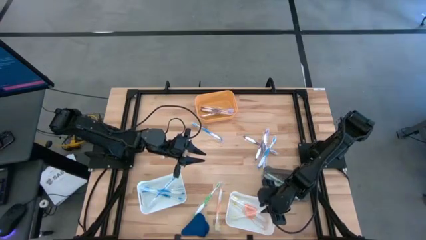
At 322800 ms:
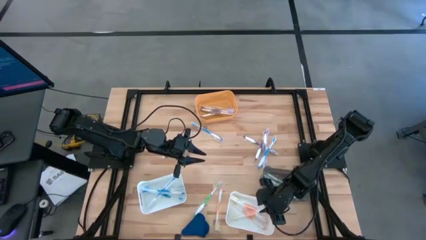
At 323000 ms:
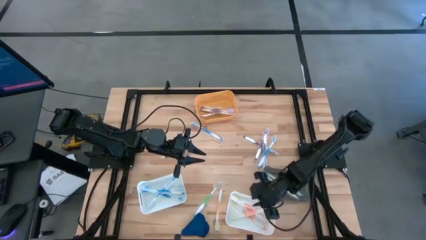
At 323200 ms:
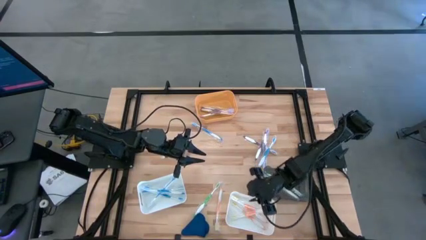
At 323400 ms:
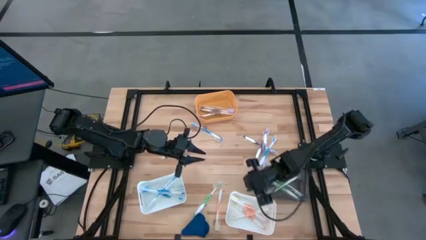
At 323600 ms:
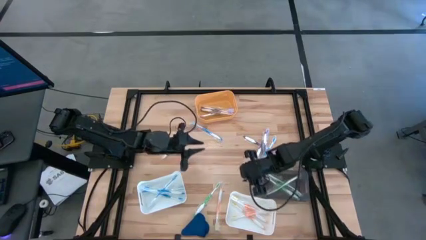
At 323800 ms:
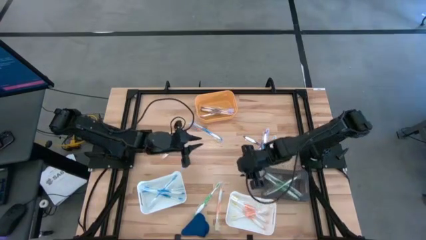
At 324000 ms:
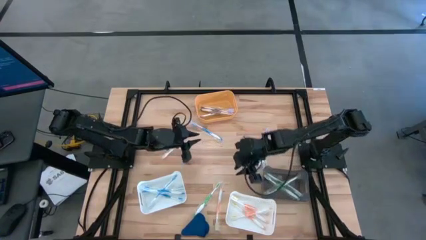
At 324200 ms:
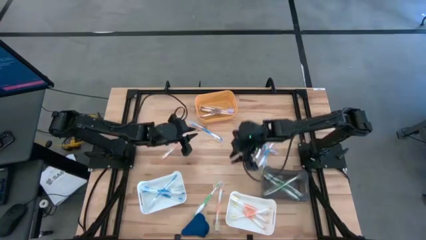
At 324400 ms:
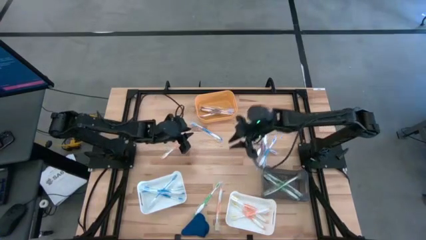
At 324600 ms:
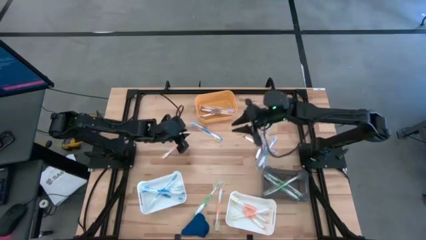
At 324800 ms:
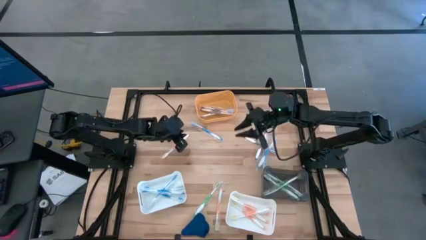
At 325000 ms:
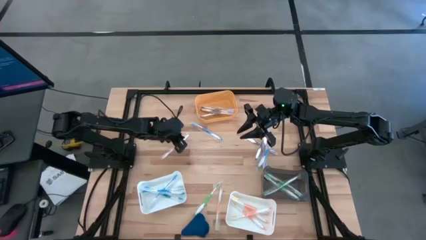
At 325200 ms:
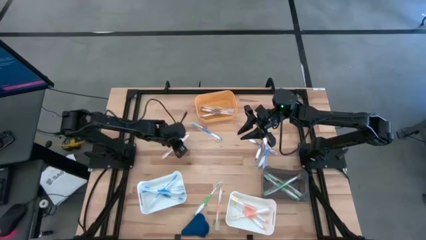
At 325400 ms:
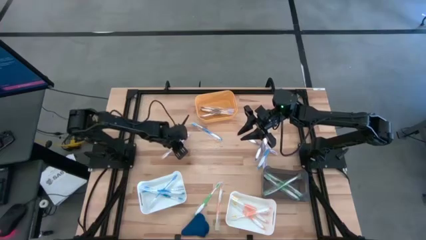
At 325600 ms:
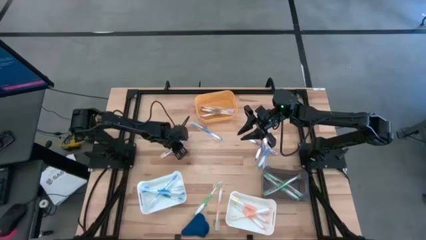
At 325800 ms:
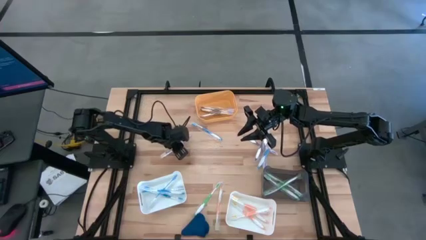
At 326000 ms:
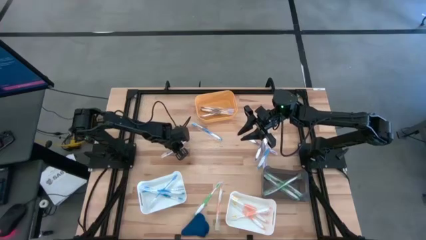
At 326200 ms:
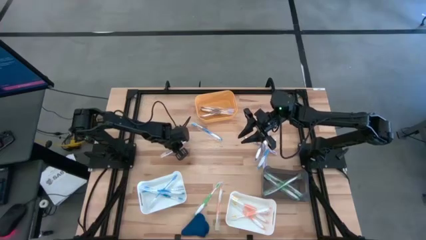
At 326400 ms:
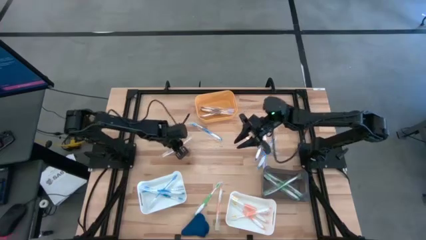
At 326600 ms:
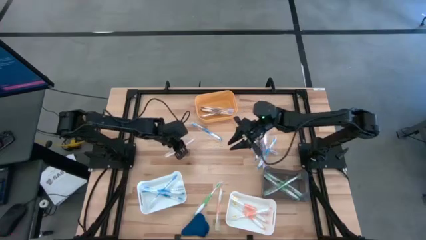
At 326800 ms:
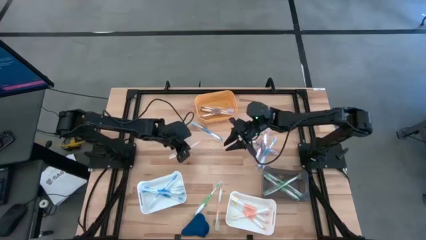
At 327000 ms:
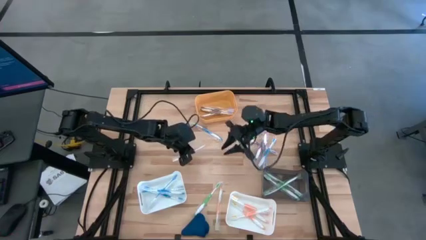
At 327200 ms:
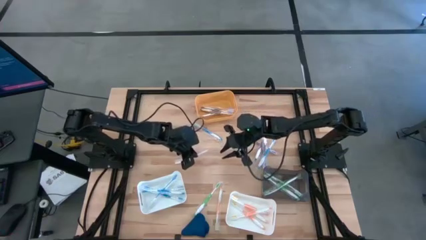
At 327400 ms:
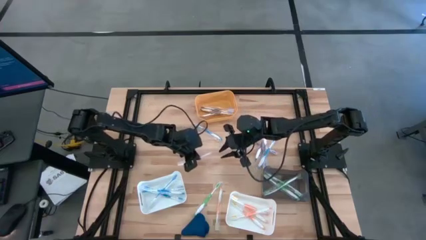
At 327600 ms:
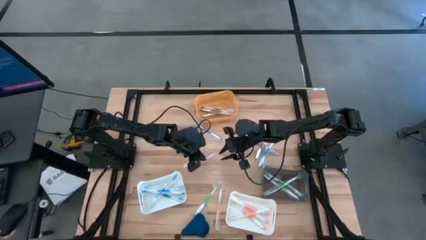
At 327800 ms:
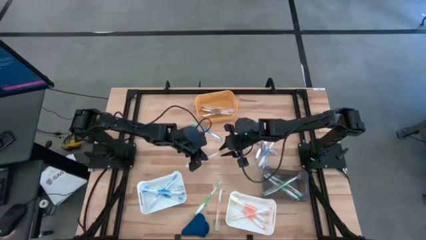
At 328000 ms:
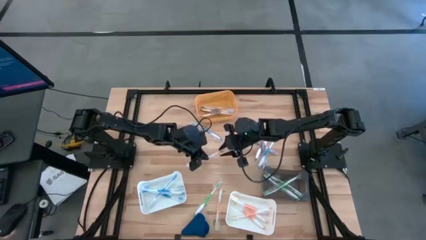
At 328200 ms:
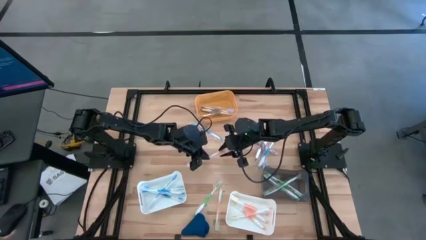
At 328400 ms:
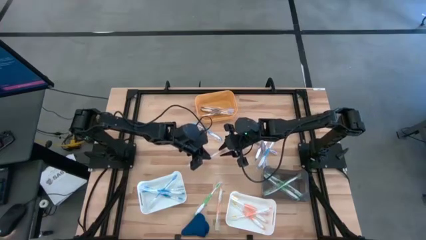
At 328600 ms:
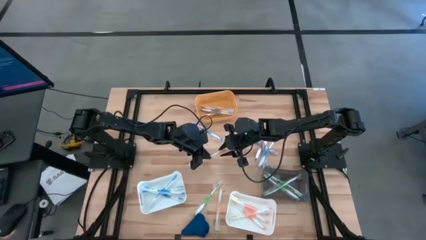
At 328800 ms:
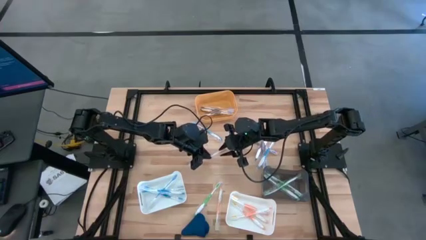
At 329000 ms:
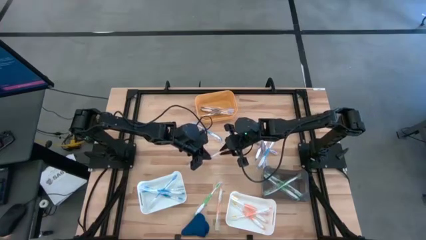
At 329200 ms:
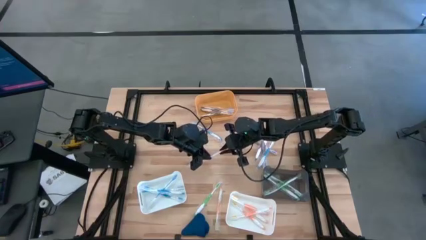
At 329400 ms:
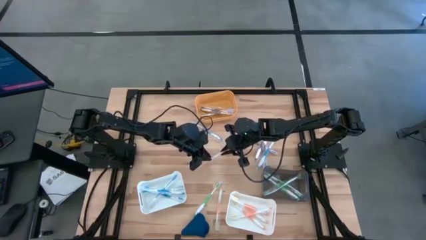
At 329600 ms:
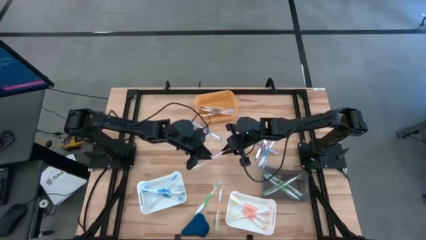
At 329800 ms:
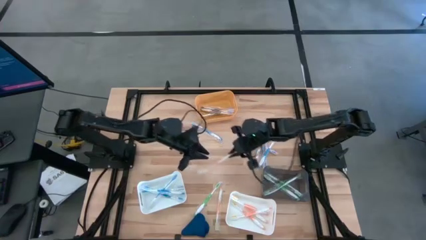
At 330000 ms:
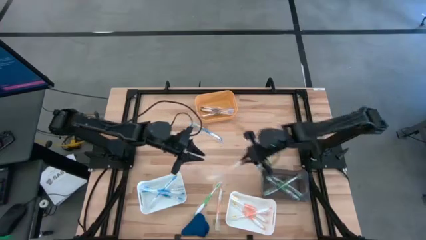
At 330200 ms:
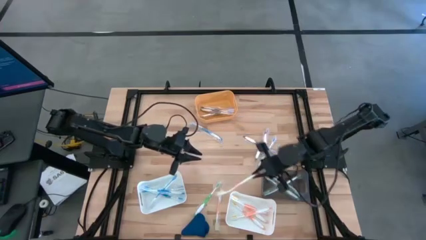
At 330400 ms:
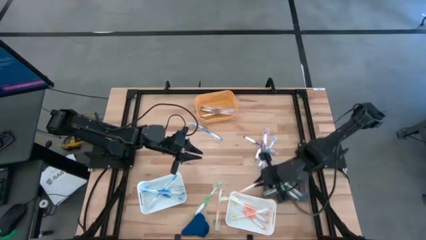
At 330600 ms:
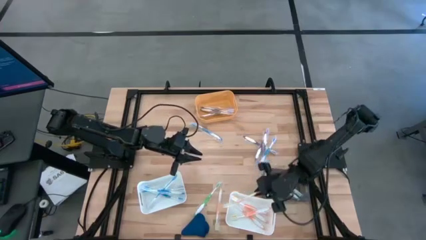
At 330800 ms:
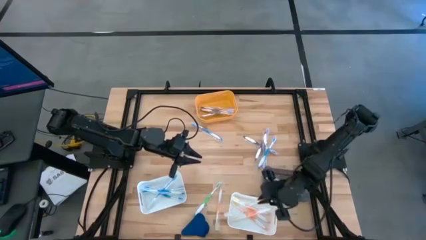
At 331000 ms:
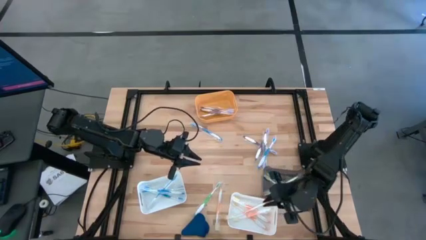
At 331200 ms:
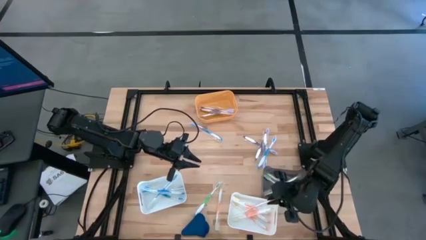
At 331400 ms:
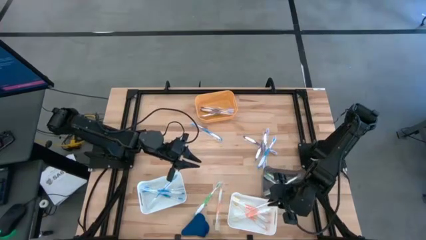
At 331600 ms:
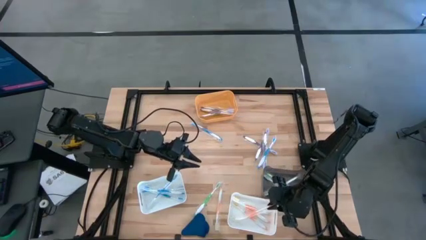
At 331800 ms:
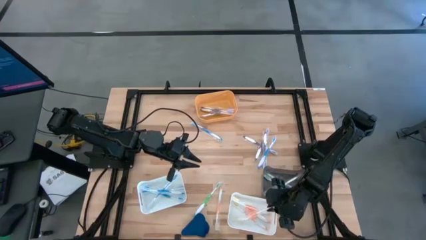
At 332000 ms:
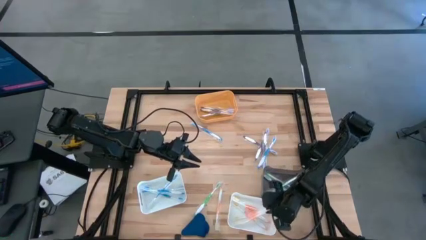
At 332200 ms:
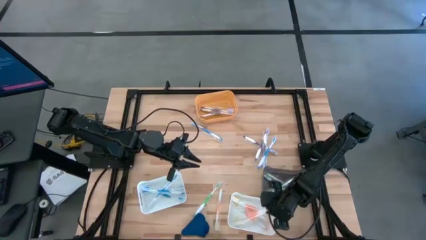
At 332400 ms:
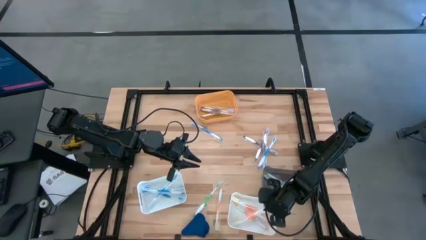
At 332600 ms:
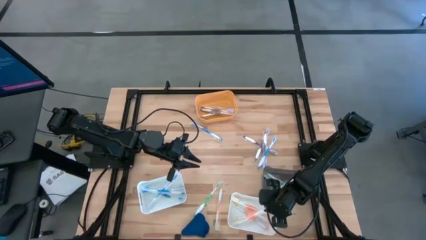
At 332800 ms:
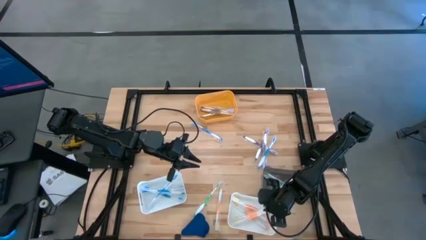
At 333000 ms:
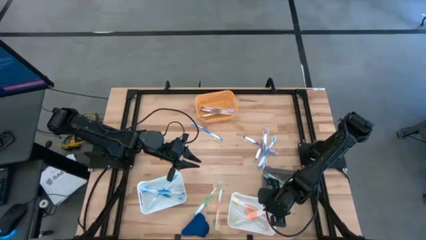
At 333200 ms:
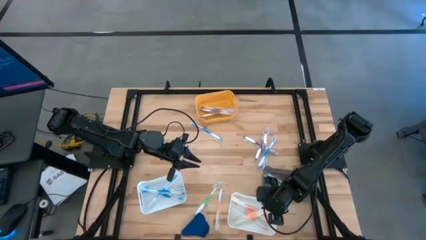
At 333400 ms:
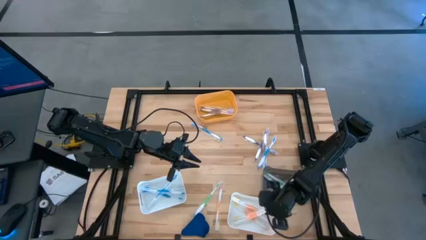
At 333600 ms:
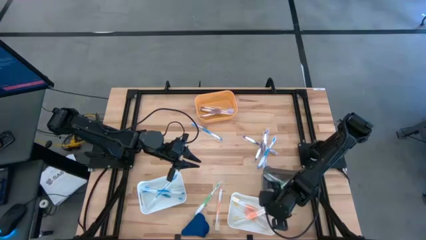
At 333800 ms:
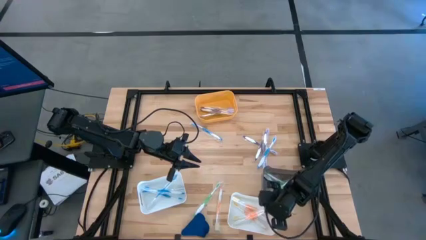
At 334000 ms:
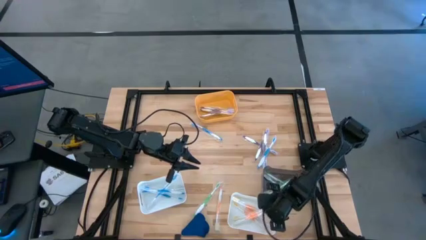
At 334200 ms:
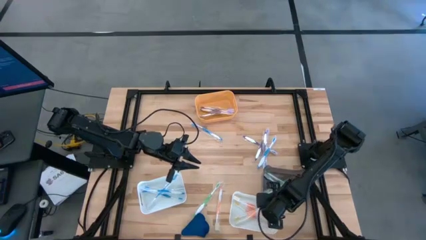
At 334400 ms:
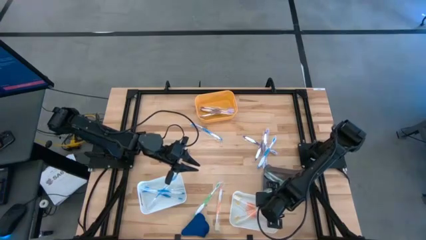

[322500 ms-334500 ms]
Task: Pick & Place Toothbrushes
Put the orange toothbrush into the right white bin

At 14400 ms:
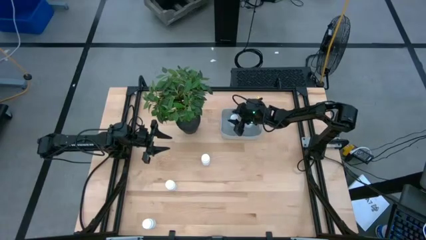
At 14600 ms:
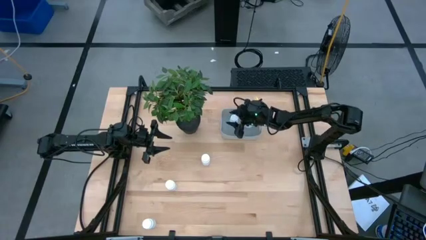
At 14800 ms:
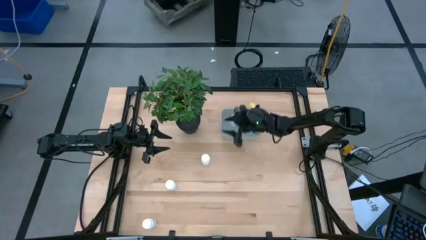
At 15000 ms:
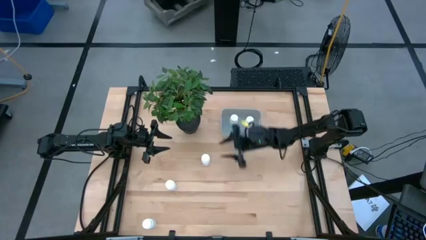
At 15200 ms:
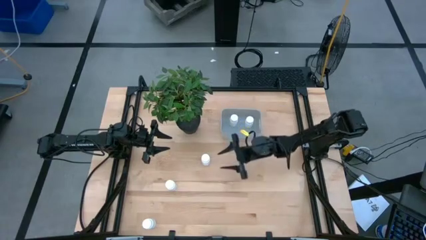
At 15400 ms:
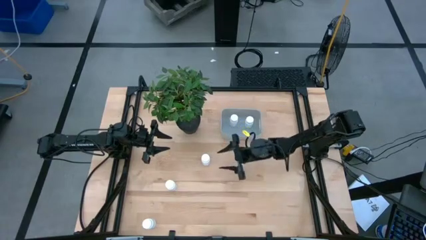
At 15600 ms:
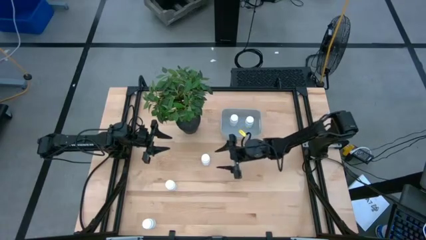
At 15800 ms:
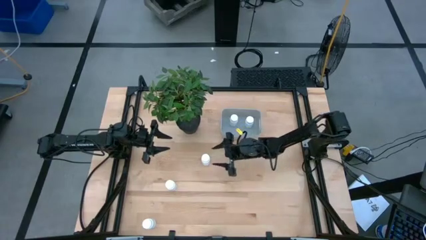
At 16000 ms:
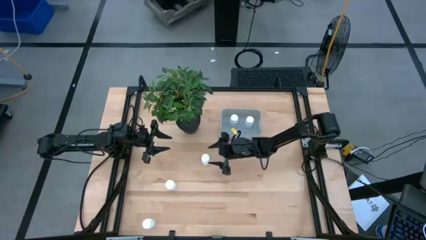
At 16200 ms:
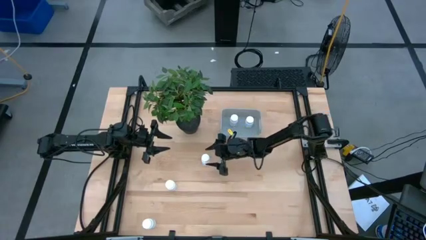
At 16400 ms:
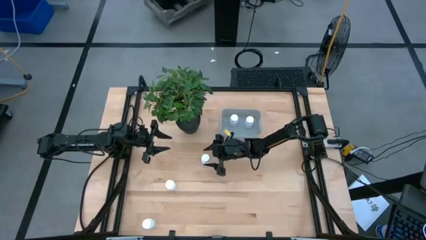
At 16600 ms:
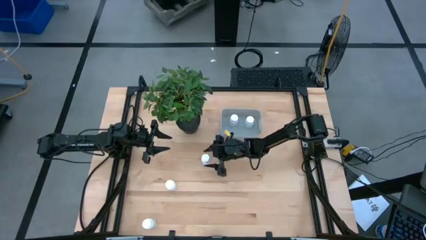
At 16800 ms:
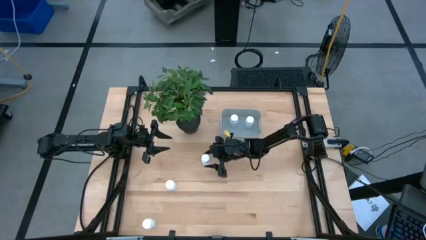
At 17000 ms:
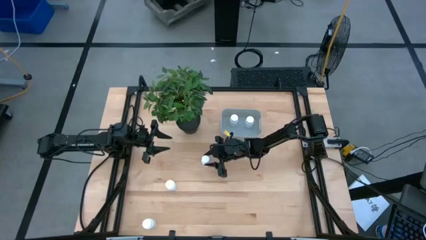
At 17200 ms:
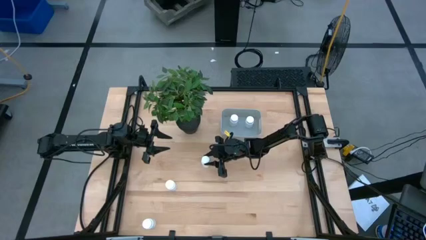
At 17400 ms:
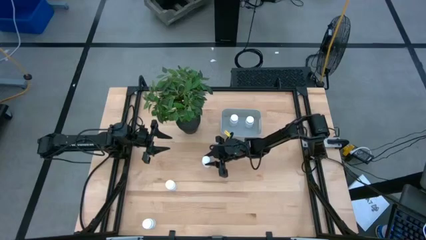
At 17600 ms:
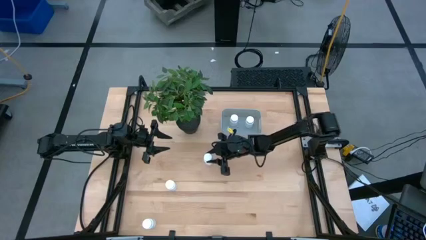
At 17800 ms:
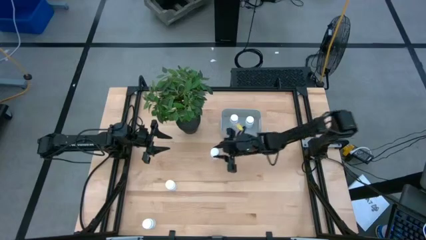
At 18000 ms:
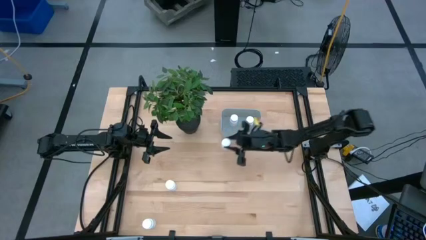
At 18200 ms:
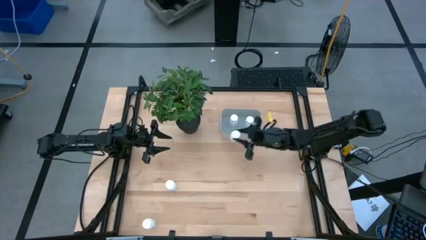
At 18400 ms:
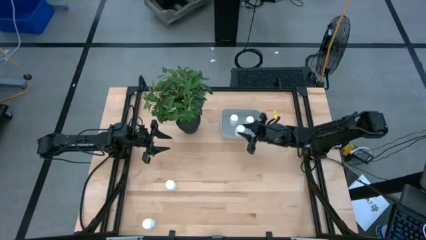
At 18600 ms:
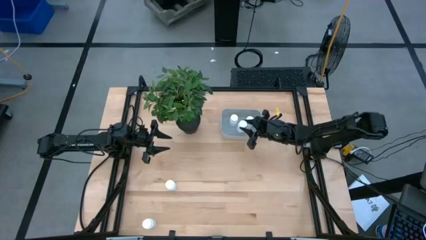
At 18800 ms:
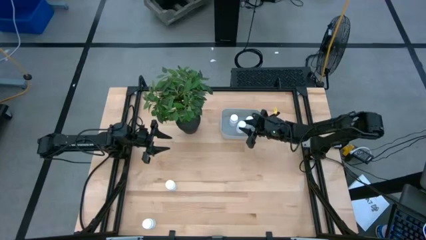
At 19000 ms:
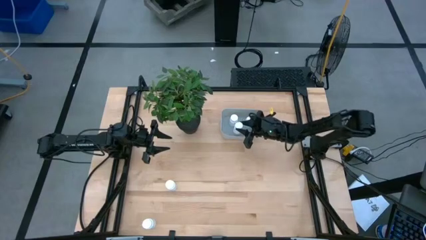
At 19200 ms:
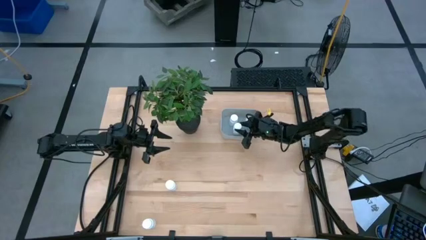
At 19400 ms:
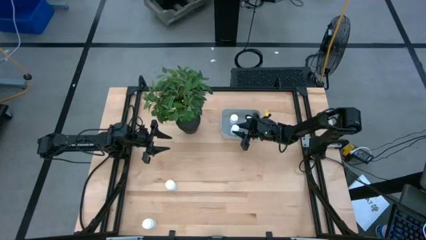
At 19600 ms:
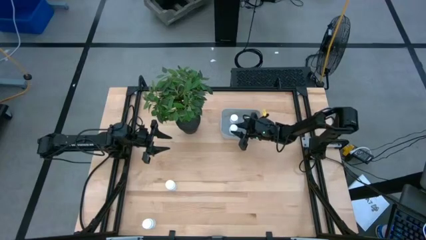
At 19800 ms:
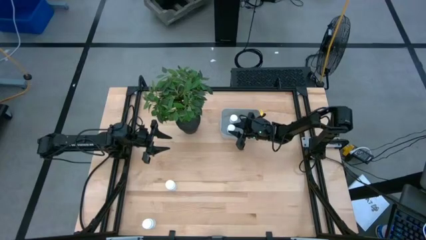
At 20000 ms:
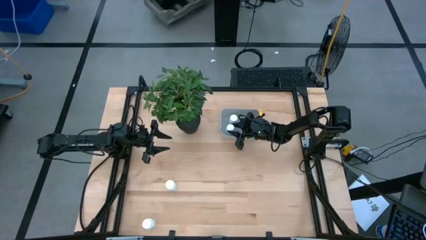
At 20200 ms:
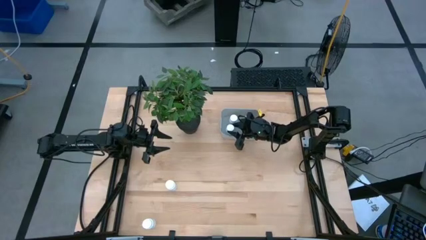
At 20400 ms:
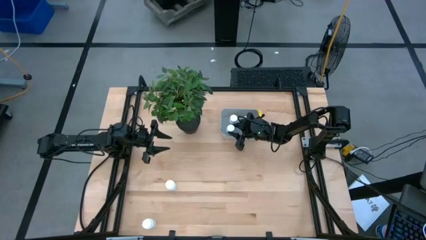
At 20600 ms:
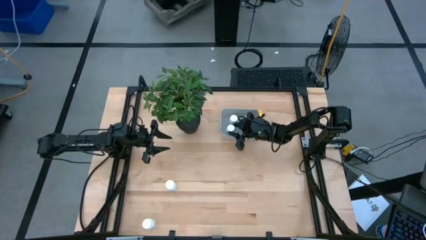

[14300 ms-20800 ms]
Task: Pick and place pill bottles into a basket
Put the white pill bottle into the gray bin
